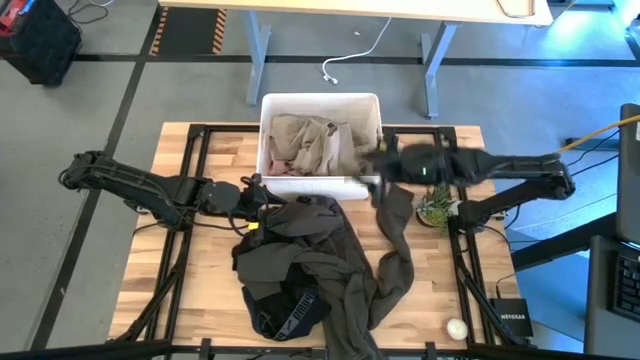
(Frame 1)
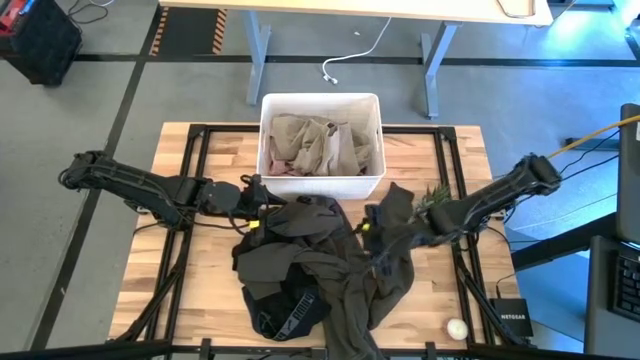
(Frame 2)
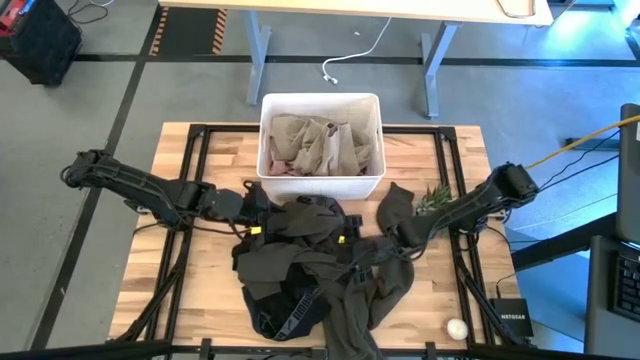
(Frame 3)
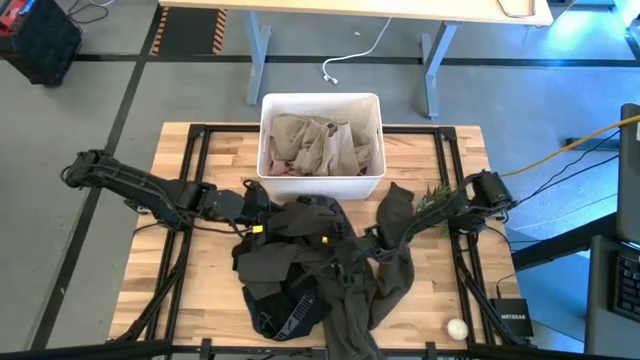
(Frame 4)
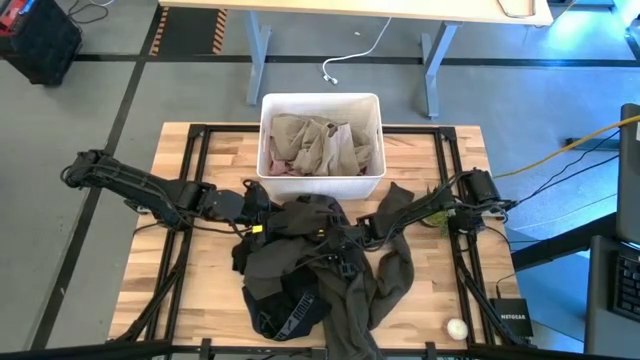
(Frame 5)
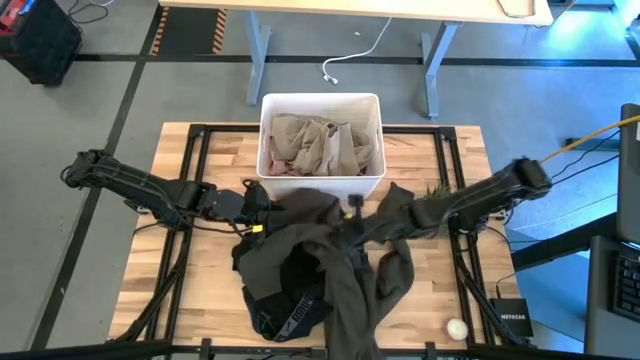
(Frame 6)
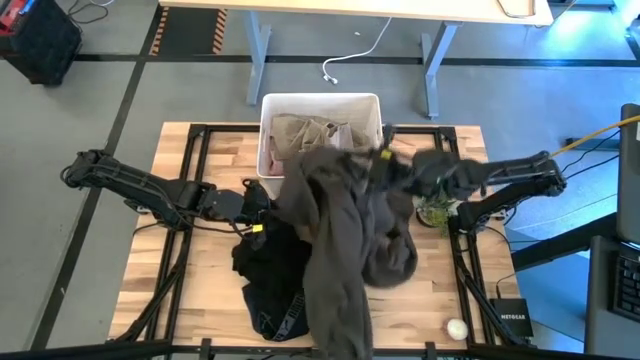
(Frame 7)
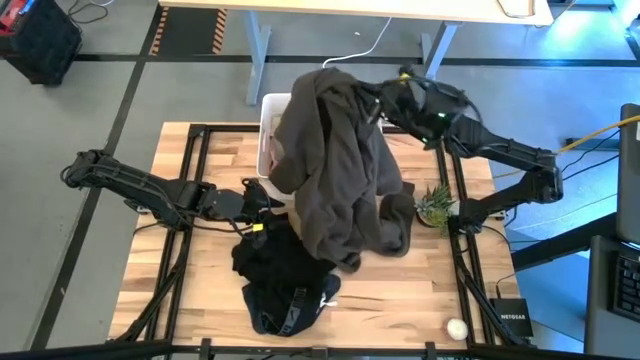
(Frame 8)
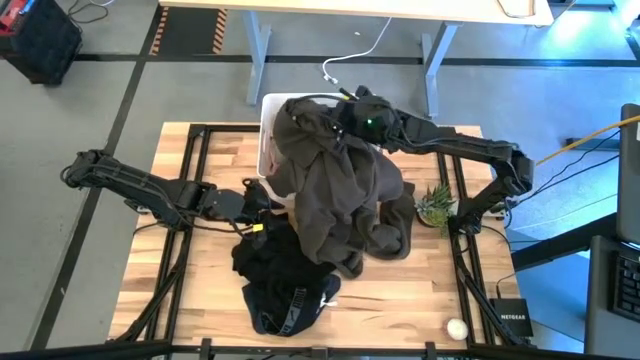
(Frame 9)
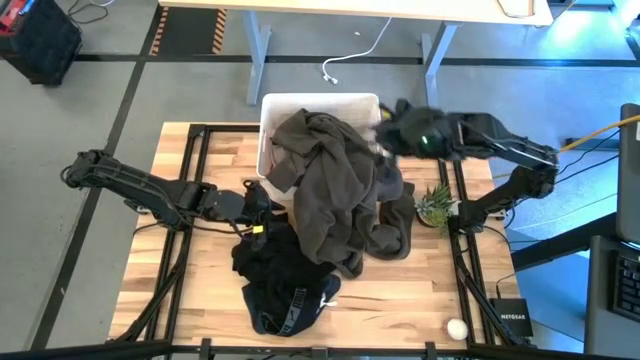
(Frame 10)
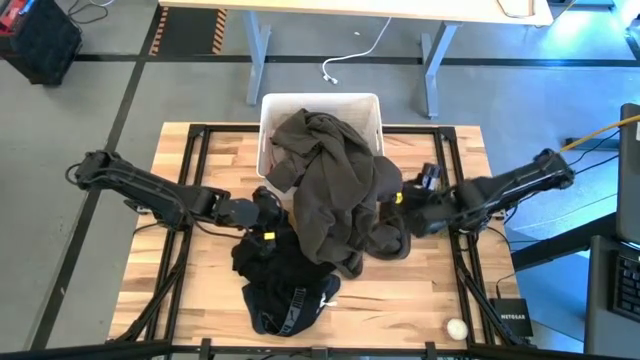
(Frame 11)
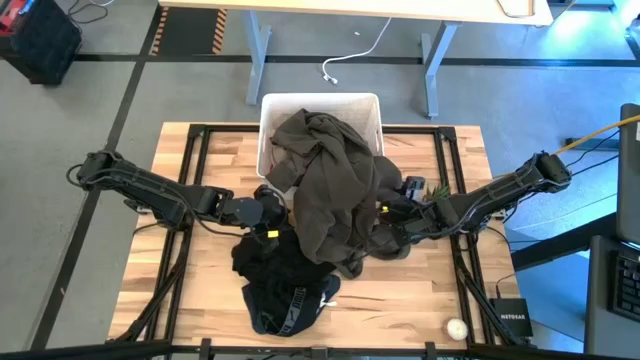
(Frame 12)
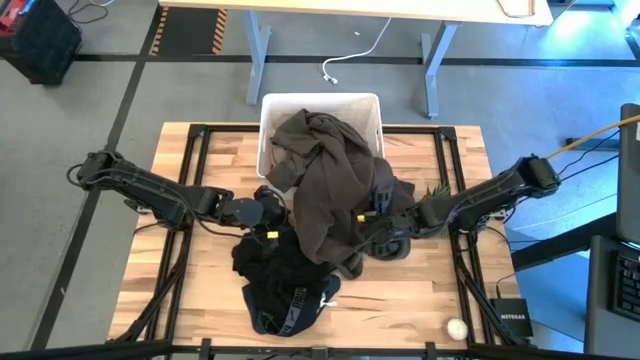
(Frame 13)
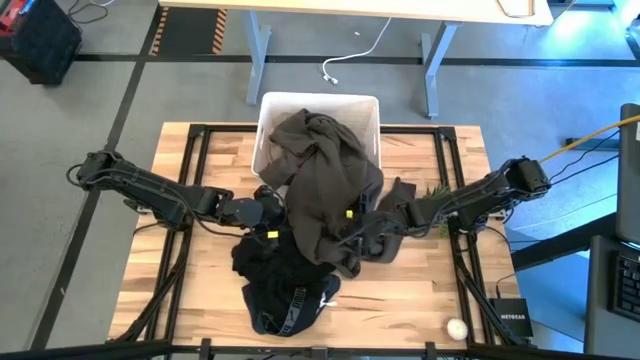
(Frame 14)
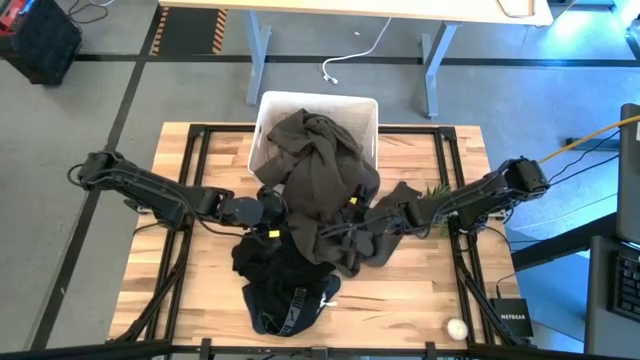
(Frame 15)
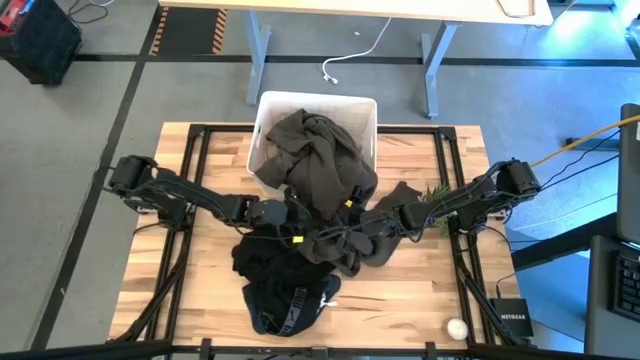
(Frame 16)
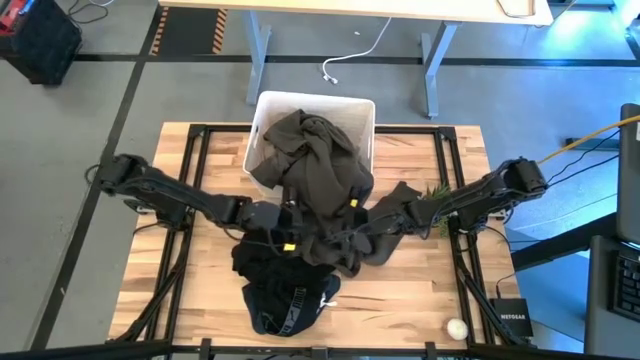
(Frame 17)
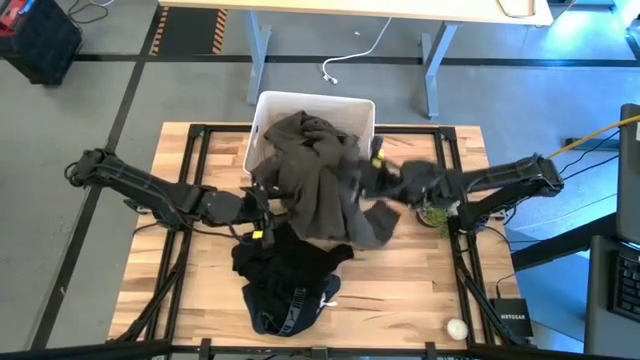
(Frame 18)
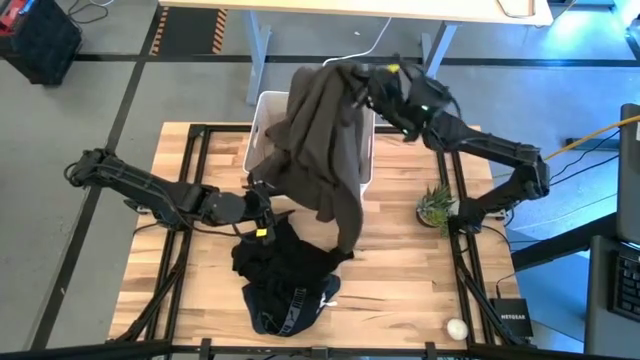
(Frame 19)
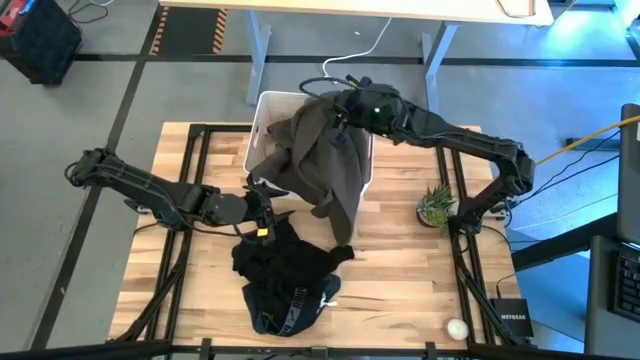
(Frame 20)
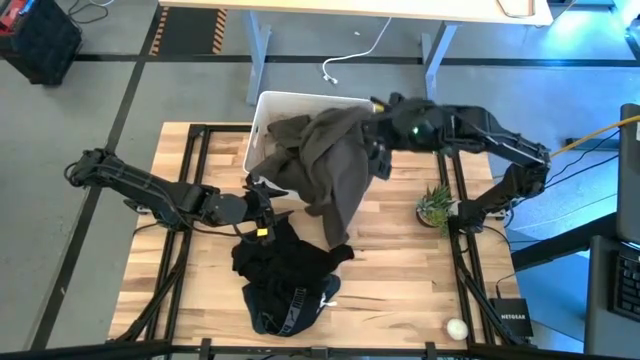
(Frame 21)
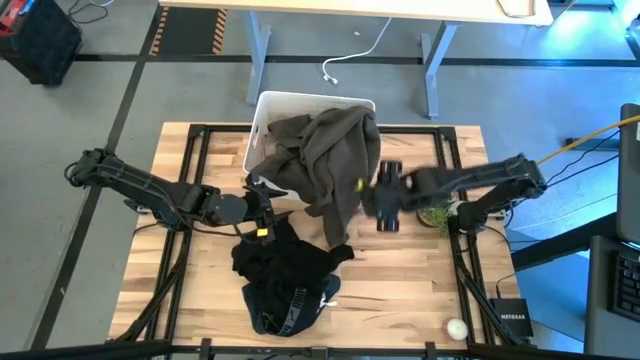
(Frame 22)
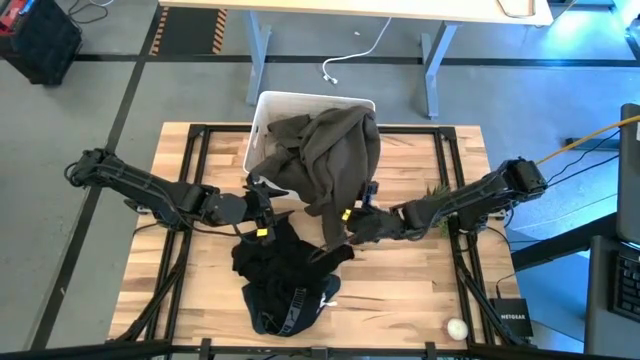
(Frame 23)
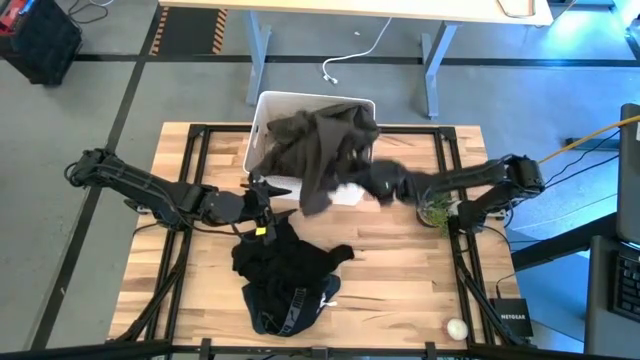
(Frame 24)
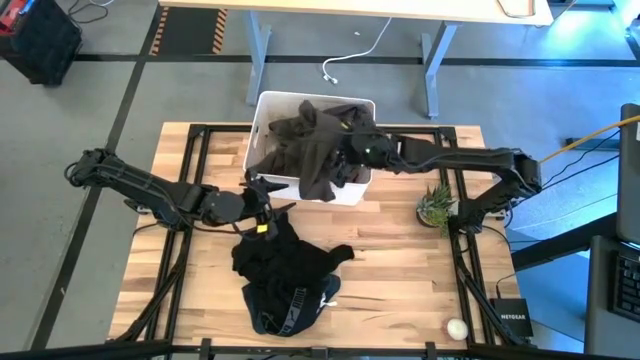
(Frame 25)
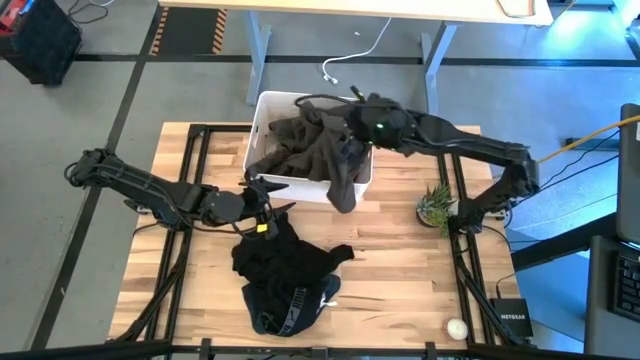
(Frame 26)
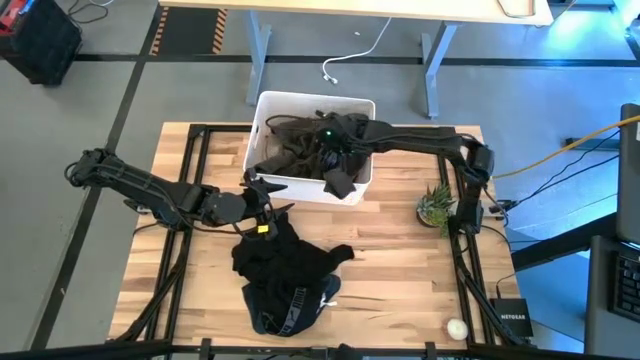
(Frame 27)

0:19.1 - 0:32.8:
Task: Sort clothes
Put the brown sweater into the white bin

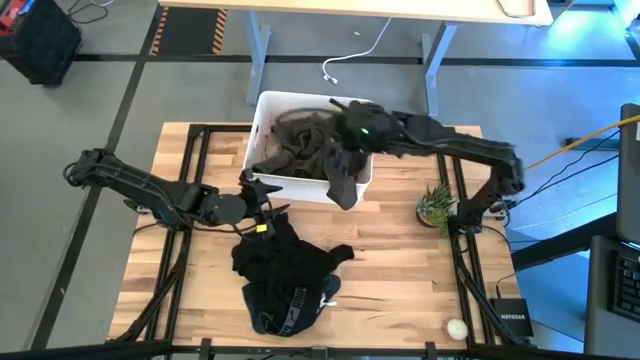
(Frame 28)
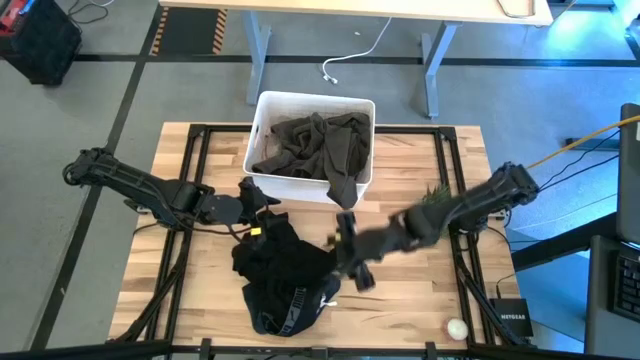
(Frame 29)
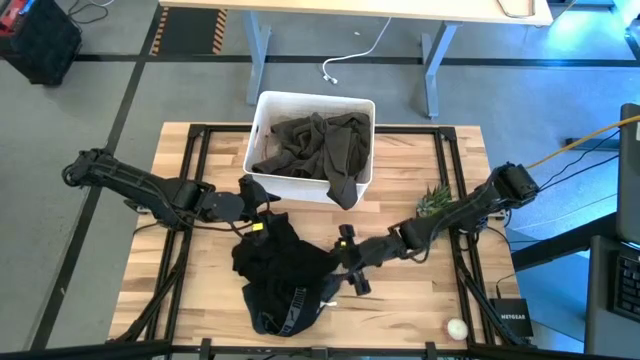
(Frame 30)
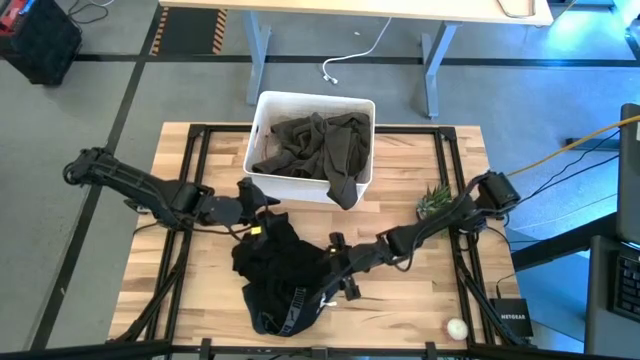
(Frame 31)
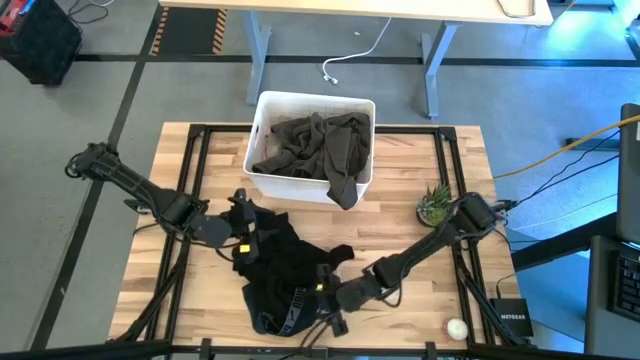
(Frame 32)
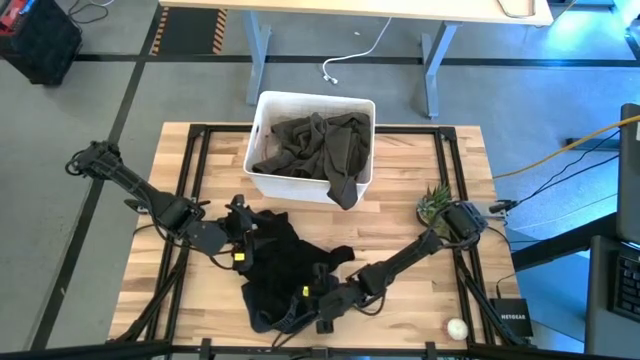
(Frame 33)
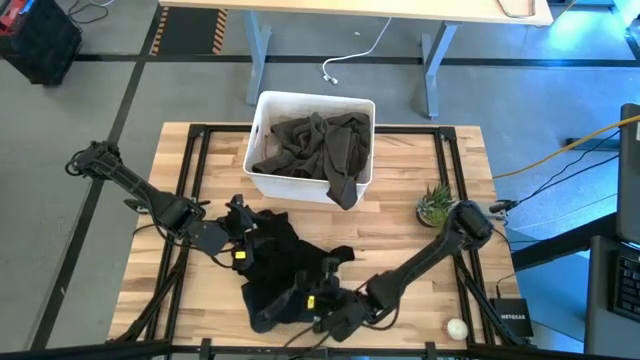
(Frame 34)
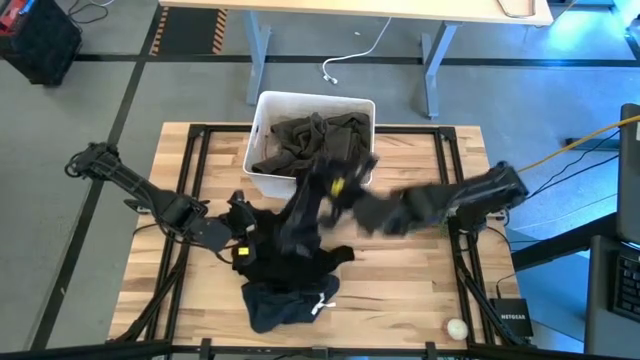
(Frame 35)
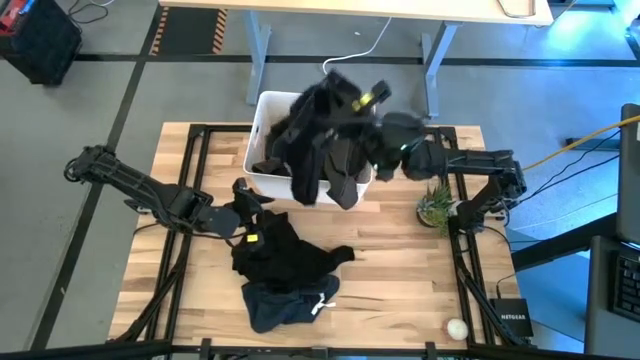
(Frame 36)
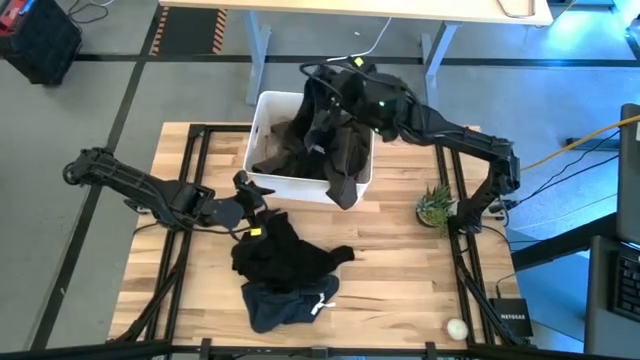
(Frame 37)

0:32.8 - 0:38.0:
Put the black boxer into the white bin

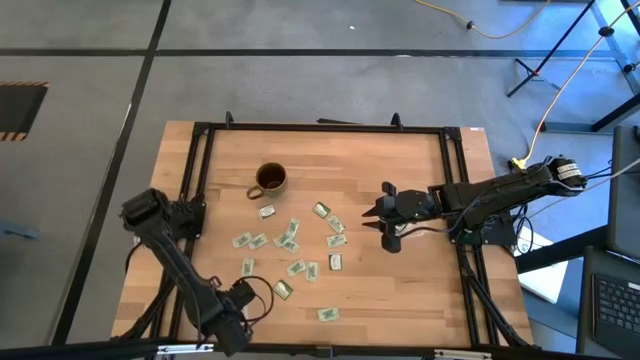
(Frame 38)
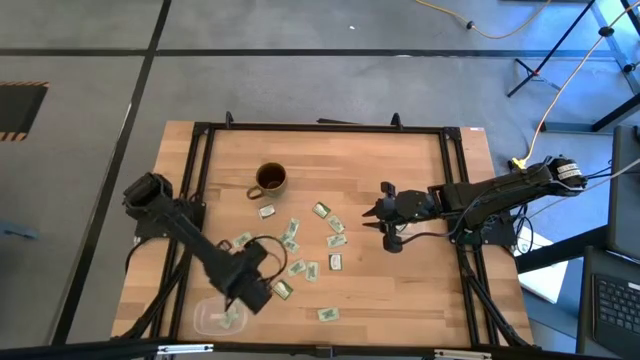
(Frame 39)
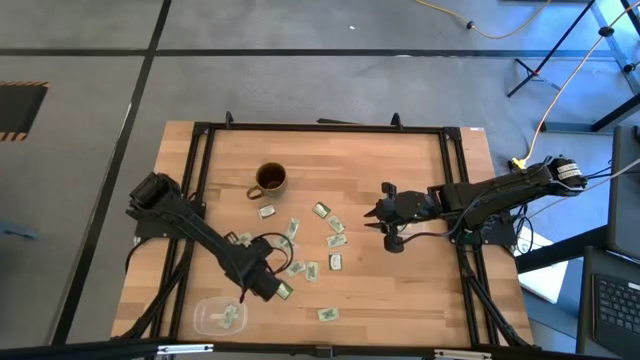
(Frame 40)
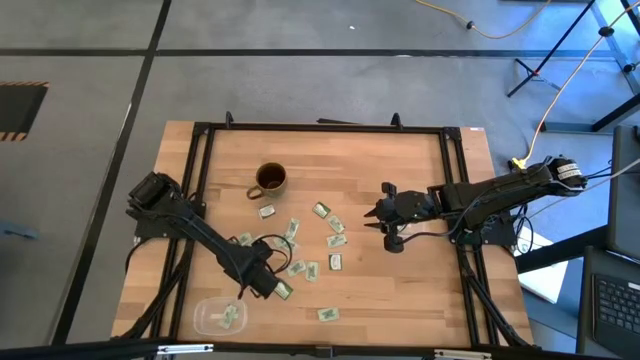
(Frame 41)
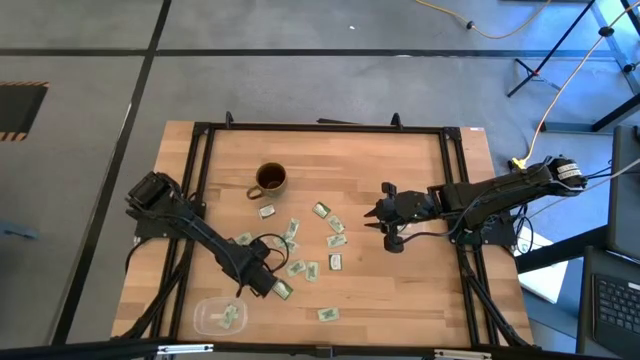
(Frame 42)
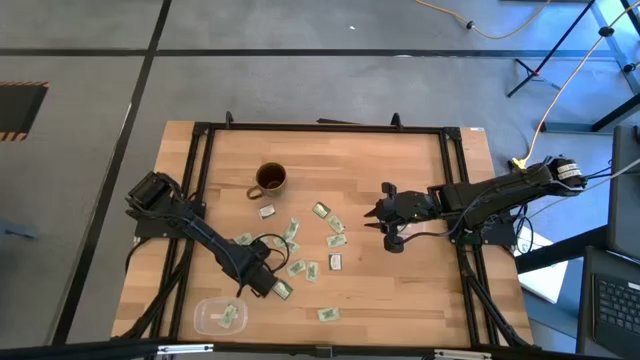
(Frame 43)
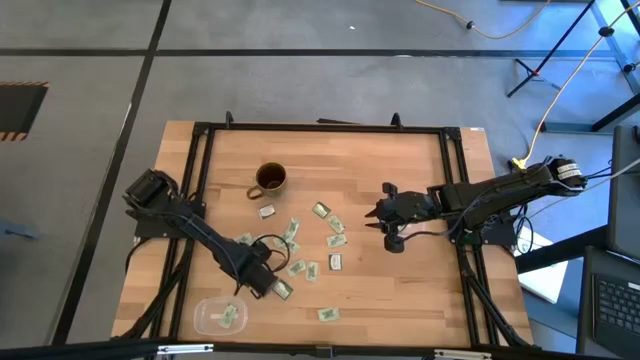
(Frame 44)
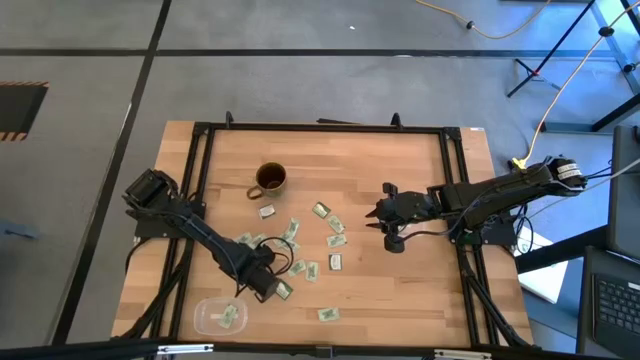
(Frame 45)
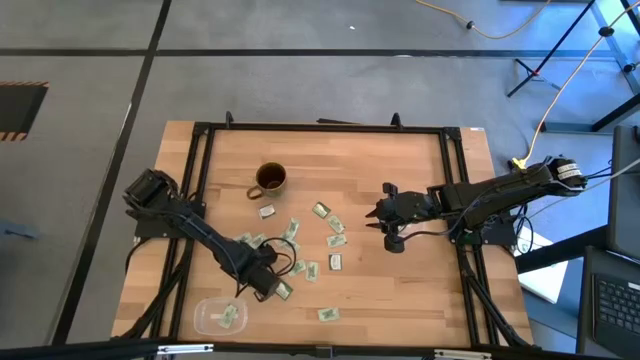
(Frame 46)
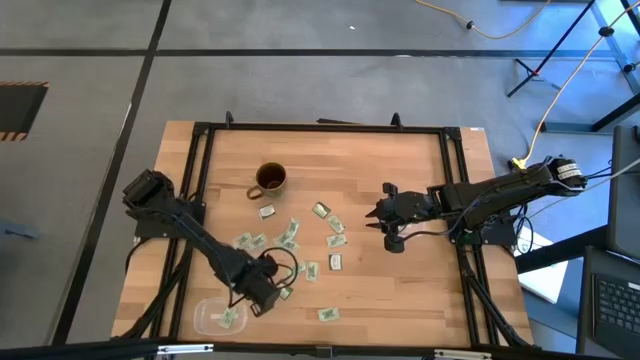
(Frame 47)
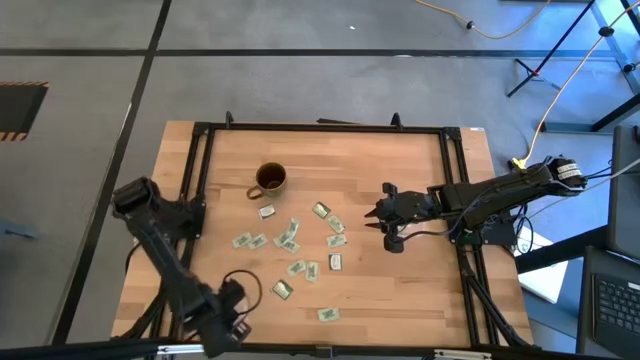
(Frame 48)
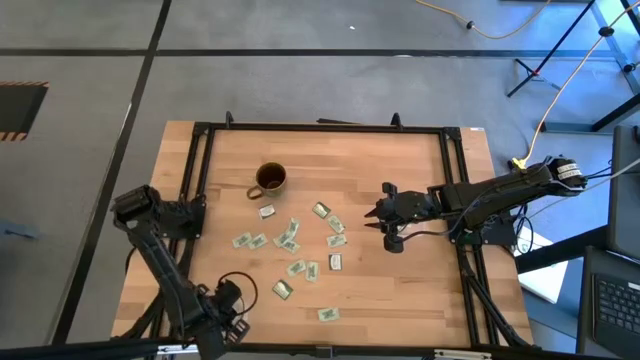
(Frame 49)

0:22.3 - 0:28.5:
Task: Pick and place Stevia / Truvia into bins
Put the stevia packet into the bottom transparent container
